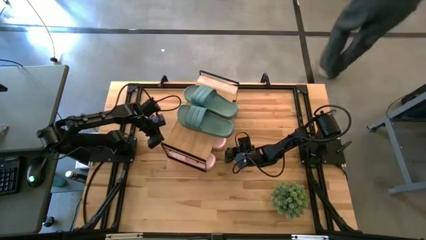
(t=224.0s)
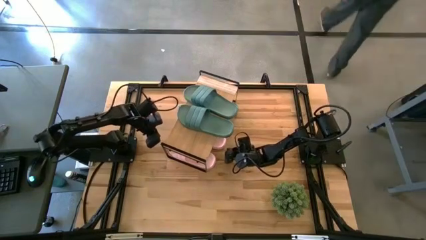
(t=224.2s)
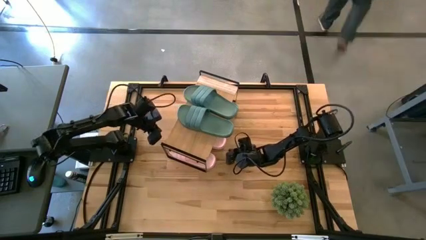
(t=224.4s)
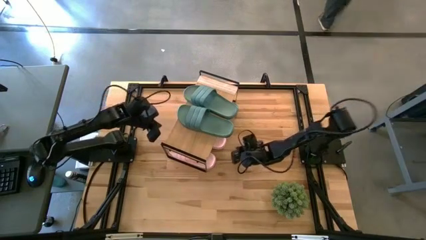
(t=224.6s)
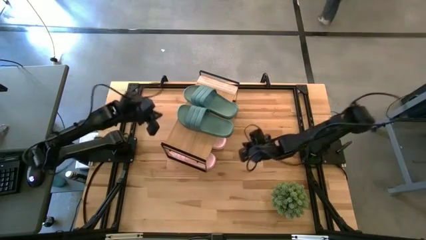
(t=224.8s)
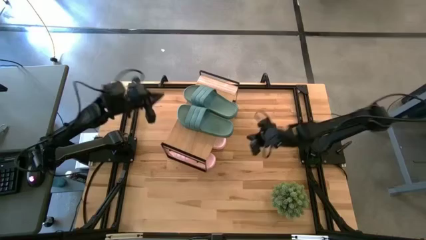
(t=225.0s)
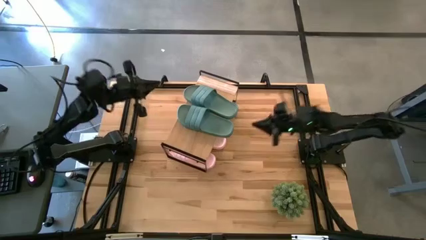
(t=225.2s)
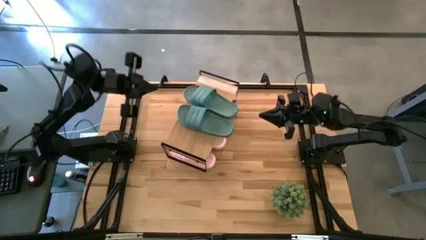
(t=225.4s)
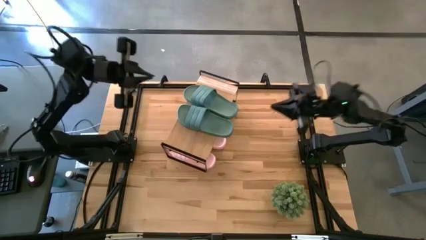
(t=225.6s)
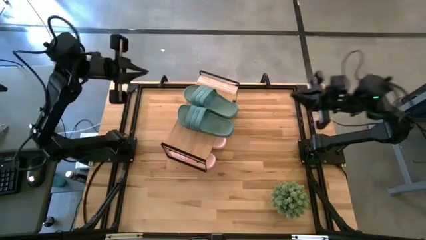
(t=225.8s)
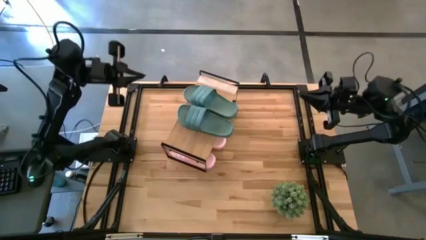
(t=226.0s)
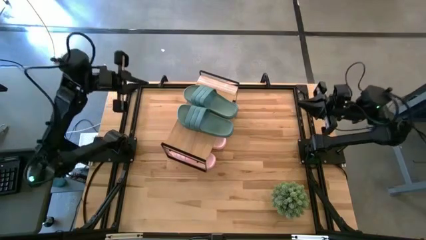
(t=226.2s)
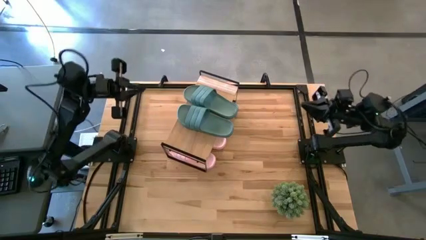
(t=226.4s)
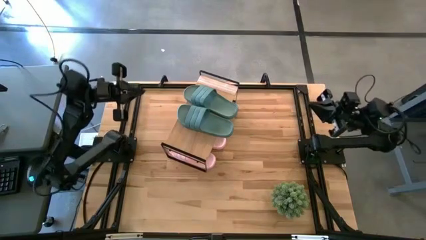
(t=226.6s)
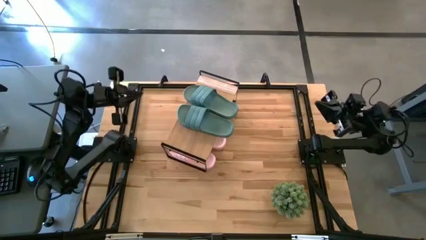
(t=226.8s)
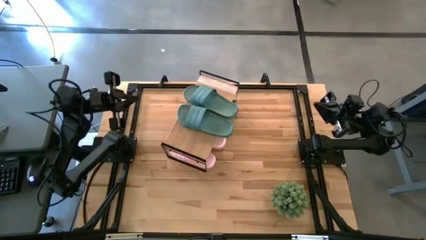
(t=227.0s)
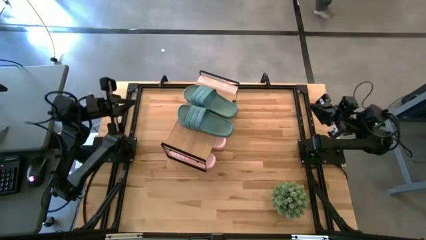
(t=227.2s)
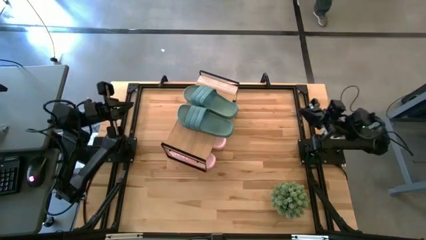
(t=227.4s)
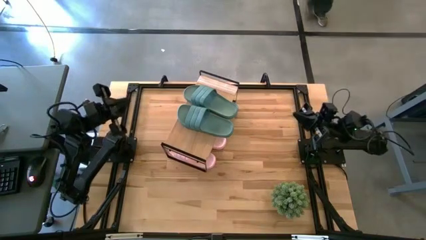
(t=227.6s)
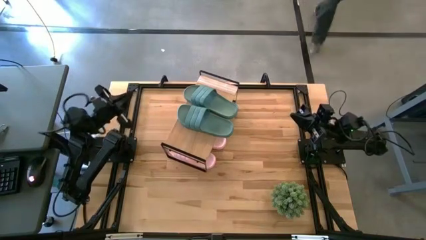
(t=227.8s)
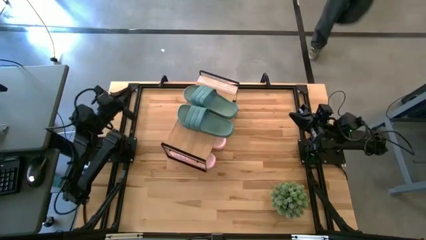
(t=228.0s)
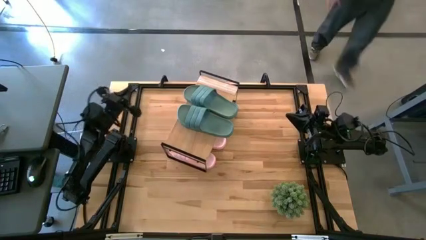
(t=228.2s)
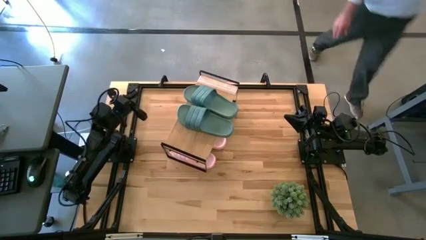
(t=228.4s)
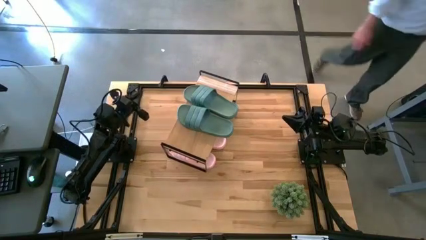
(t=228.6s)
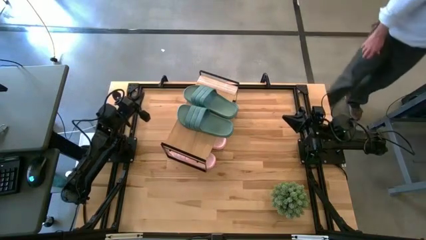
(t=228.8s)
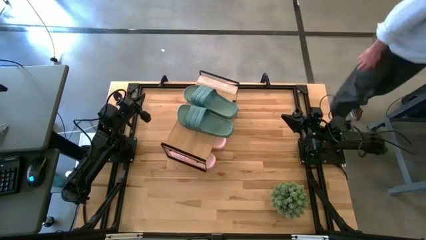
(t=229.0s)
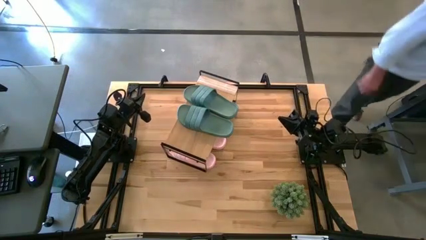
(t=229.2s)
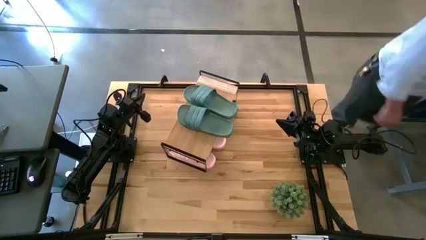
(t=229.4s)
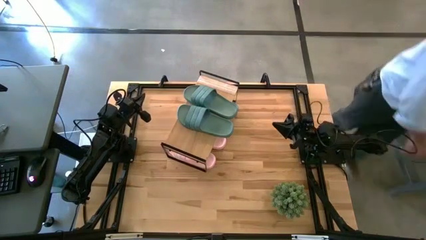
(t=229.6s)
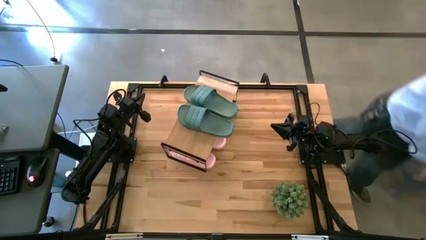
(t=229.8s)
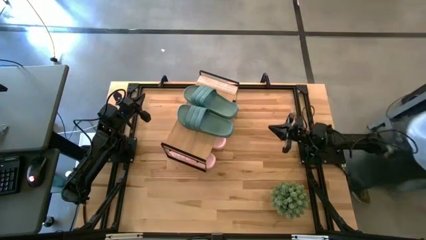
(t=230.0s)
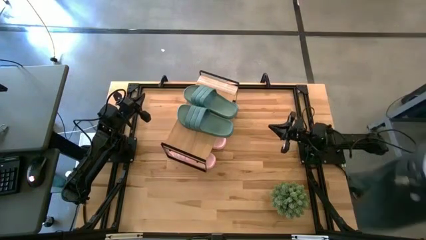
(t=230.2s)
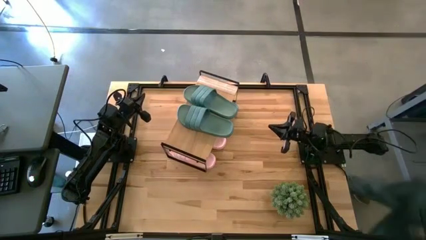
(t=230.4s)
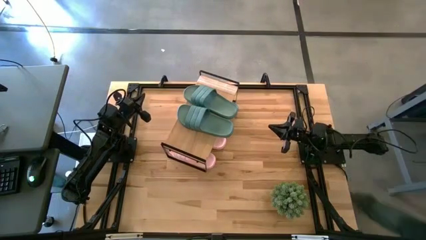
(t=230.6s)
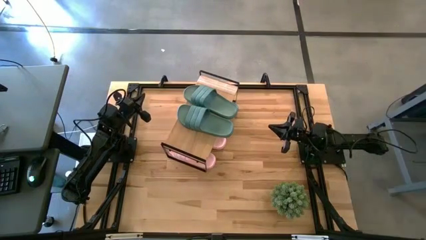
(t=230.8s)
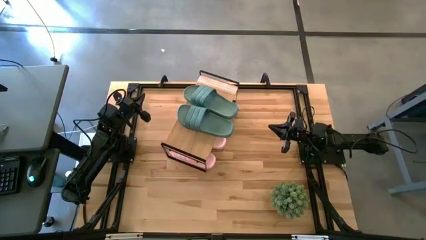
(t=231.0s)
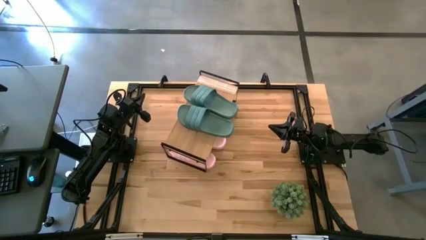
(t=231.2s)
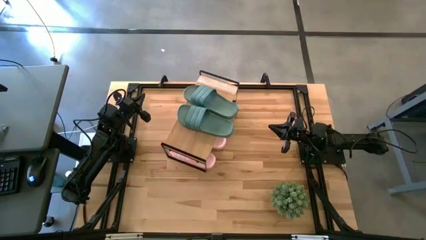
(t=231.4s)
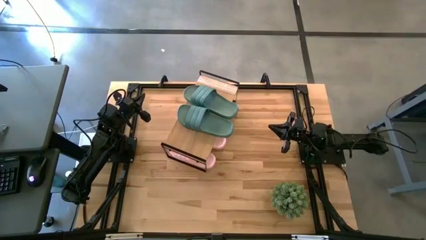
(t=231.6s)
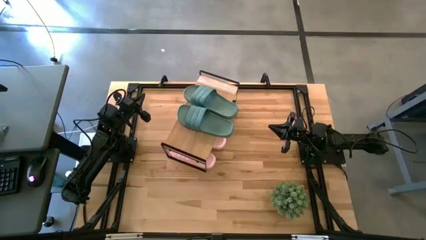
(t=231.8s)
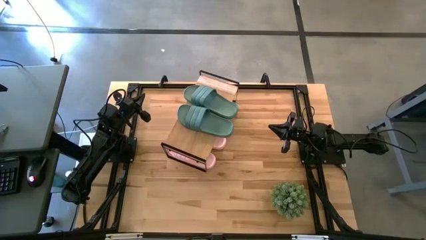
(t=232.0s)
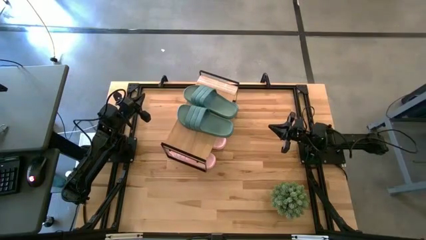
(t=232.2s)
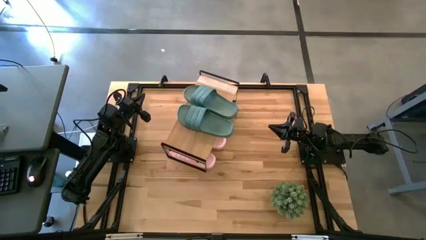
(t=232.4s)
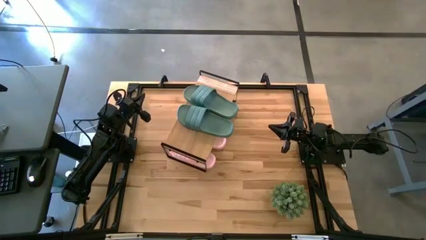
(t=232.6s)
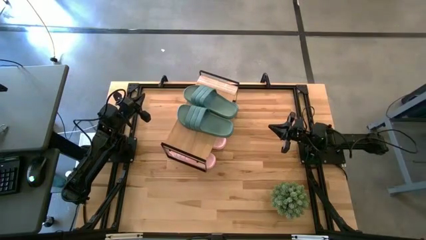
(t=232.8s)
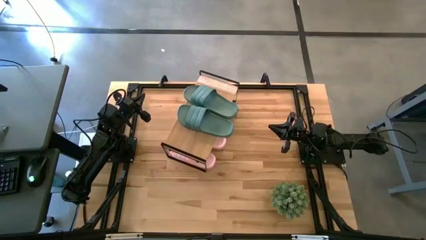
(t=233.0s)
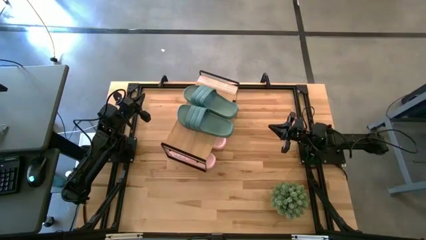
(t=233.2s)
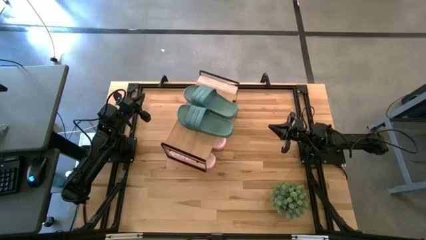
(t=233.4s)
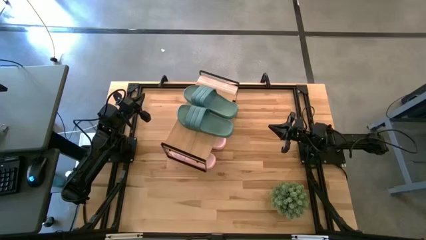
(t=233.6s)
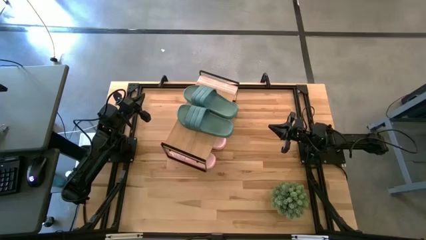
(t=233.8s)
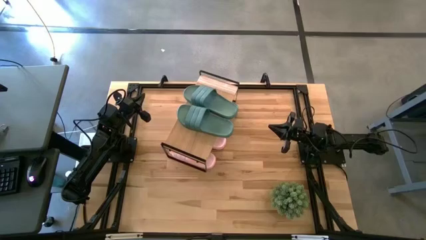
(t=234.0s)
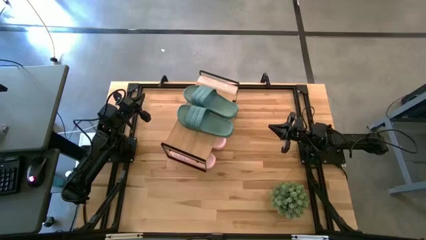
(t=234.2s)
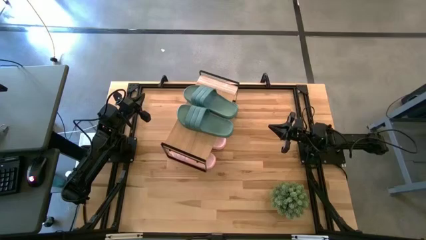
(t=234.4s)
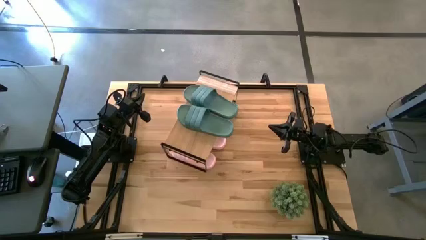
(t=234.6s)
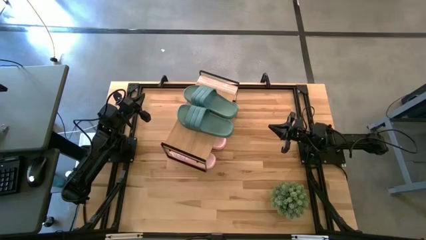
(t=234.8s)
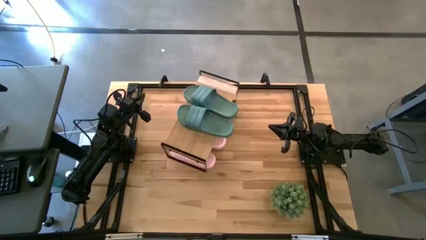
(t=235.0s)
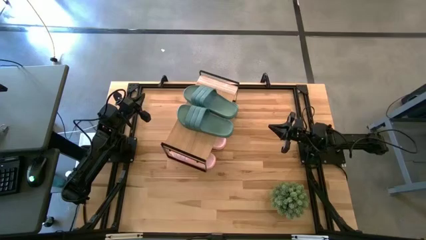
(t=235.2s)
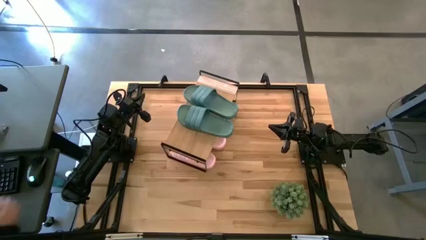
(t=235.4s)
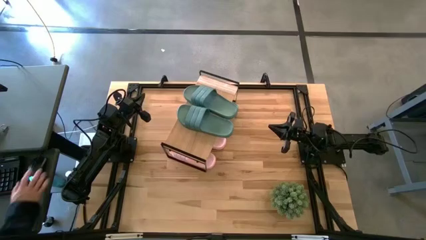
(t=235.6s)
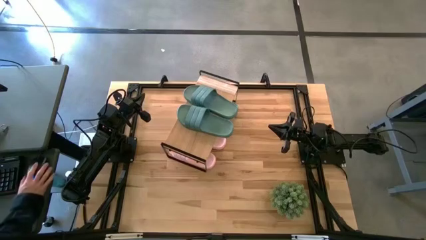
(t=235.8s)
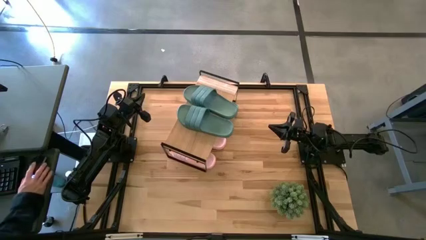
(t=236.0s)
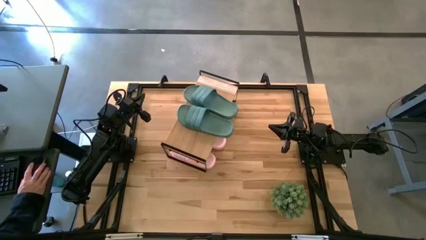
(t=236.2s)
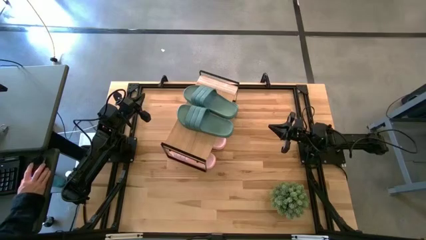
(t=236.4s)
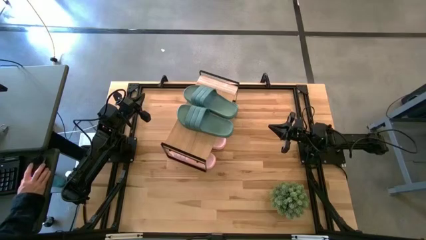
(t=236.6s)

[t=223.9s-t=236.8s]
Task: Pick and place slides into the shelf
Return to Home Position

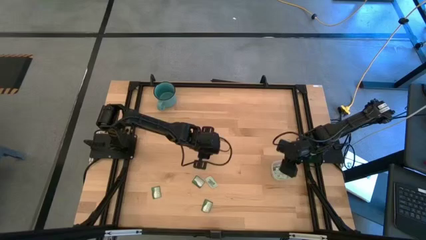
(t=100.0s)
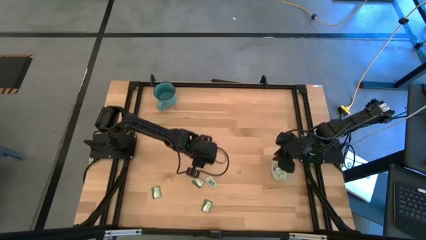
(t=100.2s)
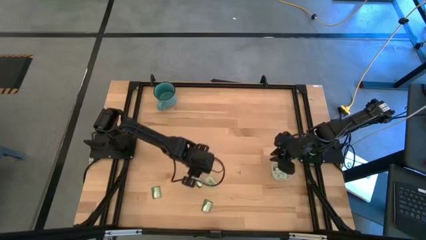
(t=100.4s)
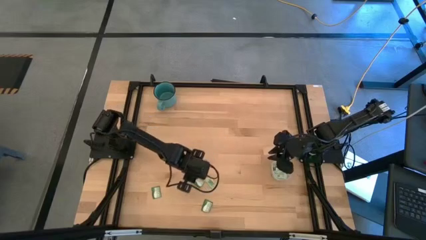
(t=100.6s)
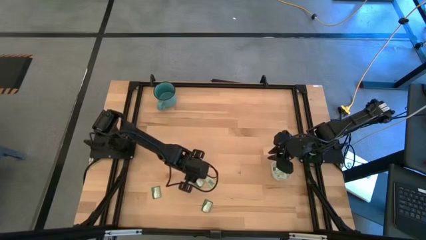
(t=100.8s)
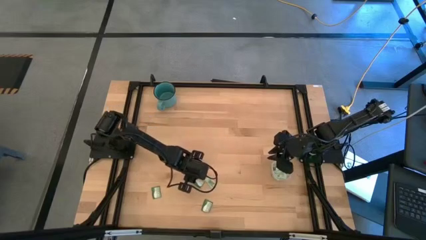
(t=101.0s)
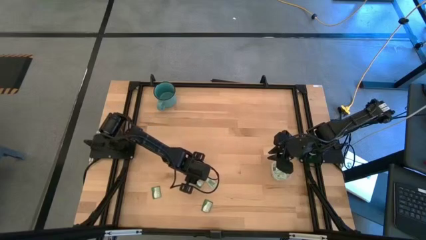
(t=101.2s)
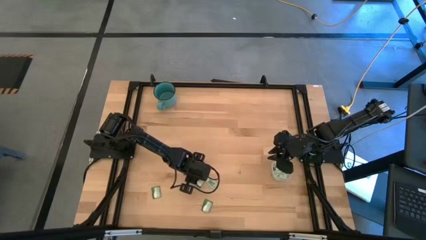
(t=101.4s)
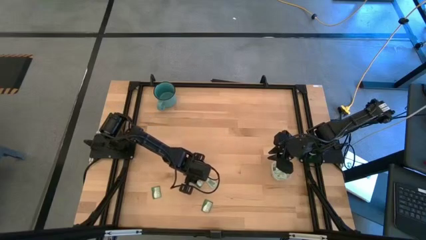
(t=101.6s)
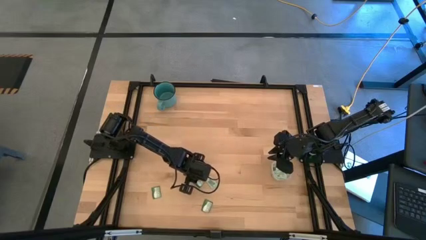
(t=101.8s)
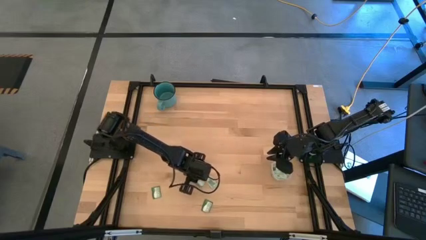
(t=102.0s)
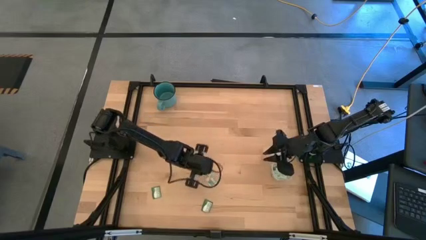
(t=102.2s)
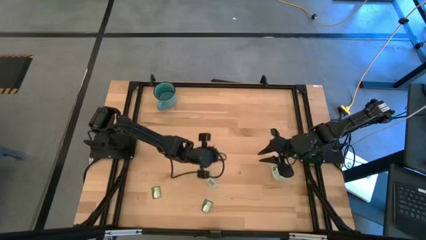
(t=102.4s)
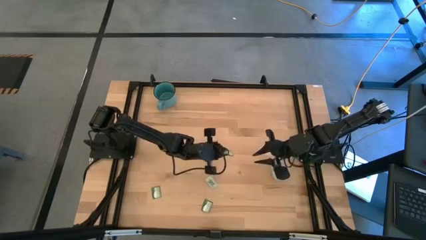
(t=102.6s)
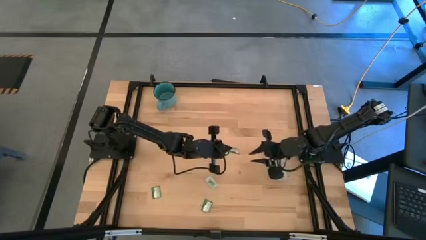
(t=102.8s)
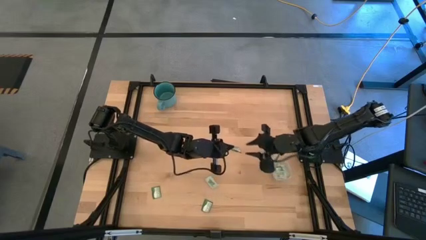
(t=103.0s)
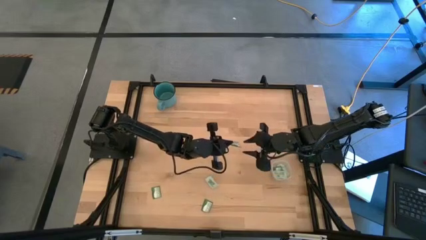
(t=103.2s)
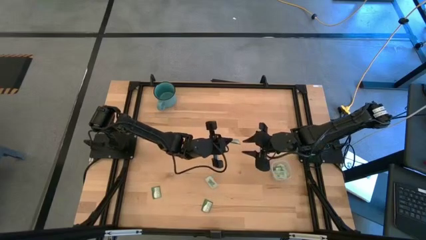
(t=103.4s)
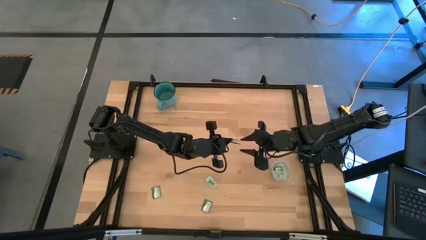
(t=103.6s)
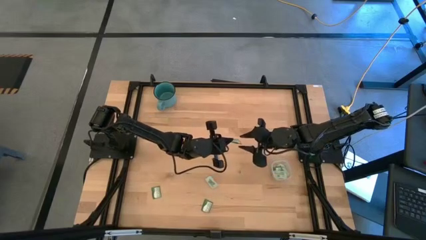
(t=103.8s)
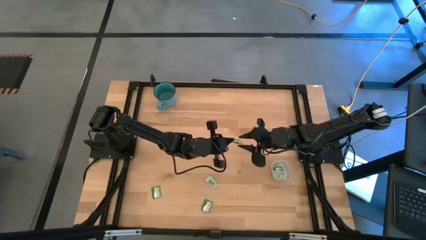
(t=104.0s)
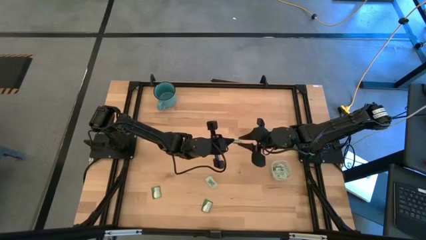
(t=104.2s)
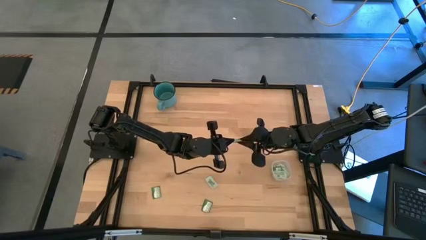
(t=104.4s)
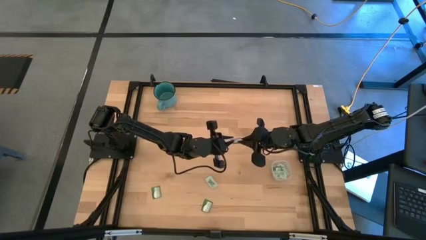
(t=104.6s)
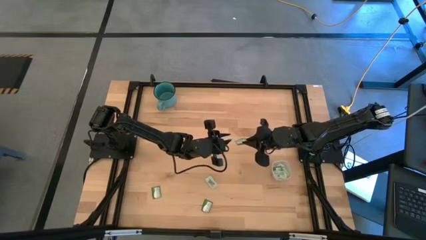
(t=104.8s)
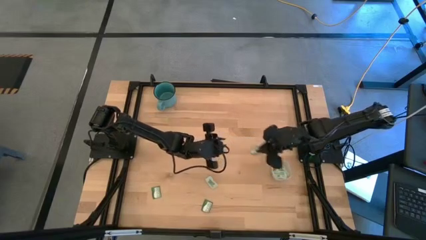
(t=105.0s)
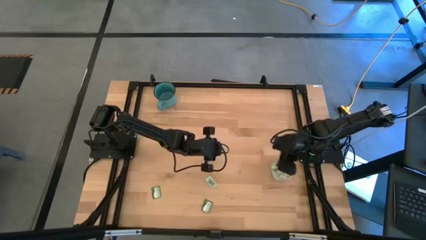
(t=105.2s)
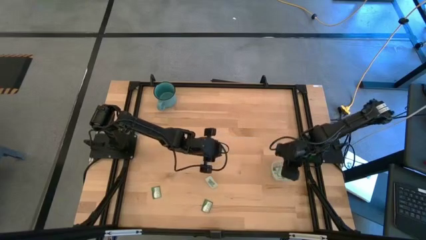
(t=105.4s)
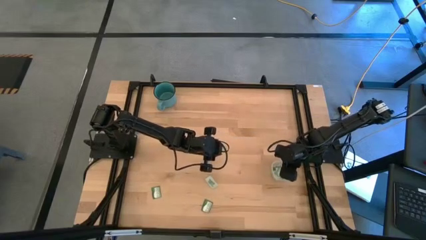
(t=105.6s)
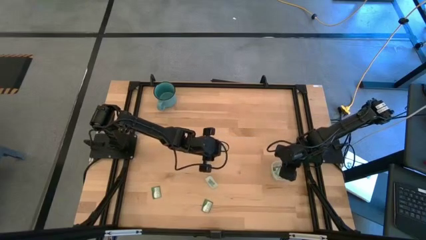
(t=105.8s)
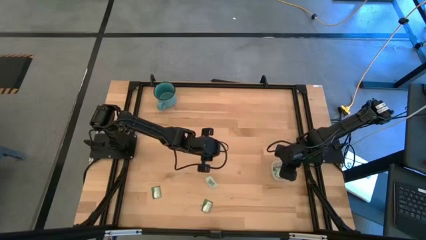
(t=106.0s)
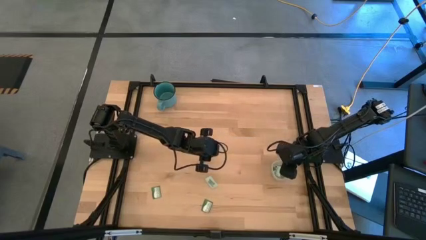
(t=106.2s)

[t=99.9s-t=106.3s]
Task: Pick and place items into bin
Put the green stevia packet into the transparent bin
